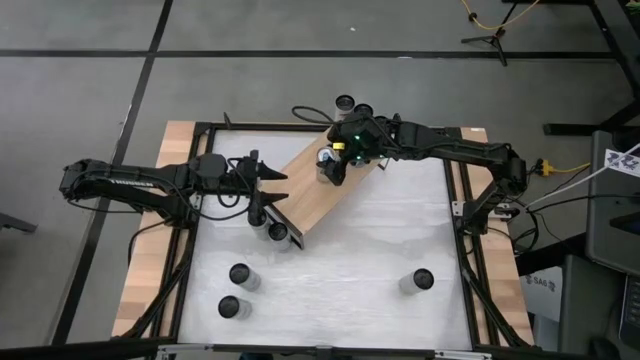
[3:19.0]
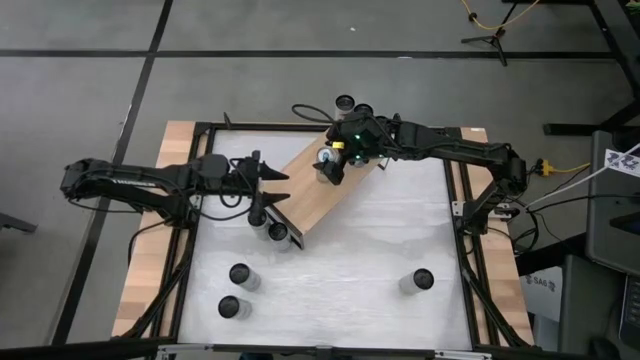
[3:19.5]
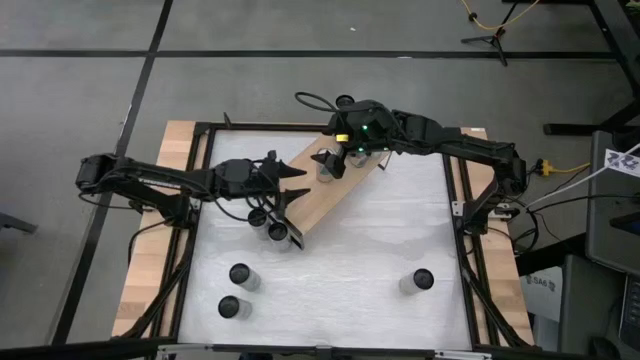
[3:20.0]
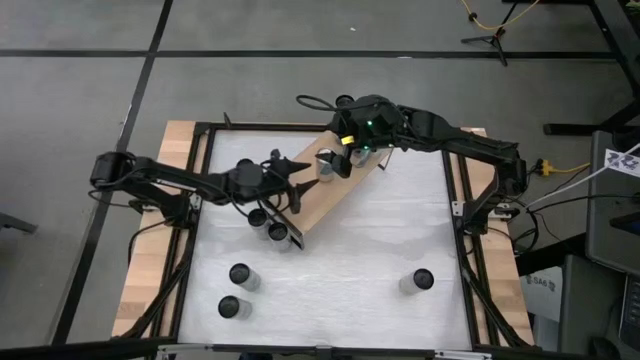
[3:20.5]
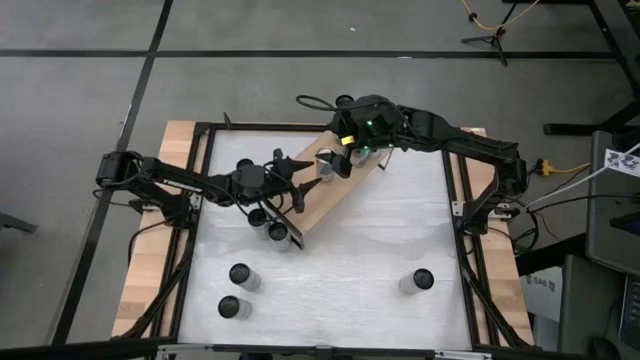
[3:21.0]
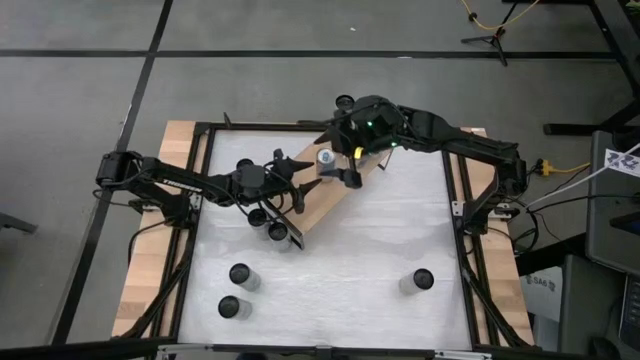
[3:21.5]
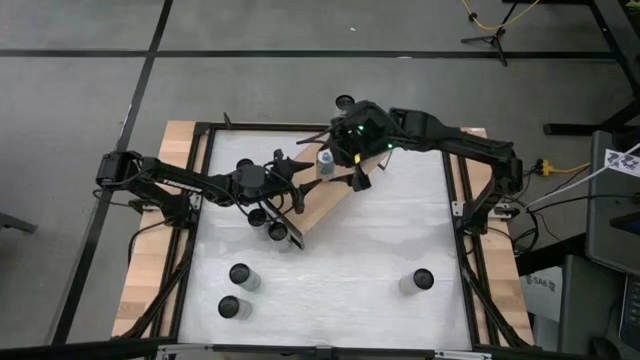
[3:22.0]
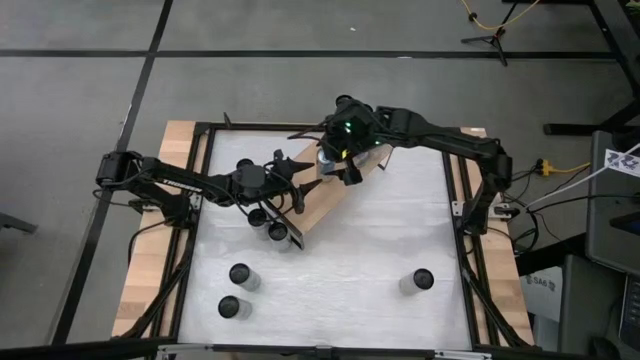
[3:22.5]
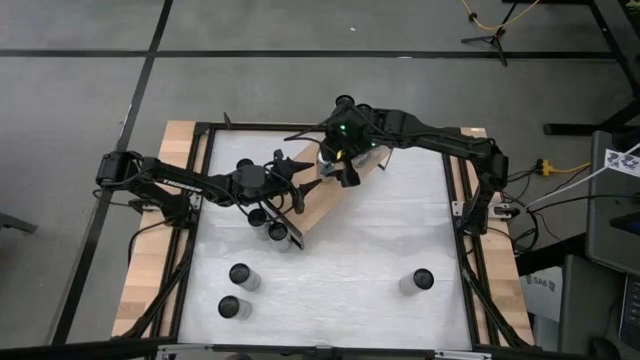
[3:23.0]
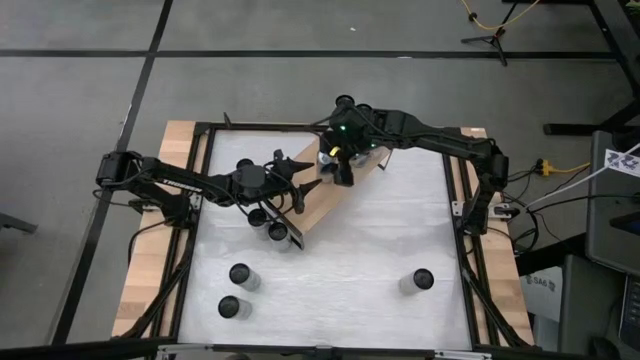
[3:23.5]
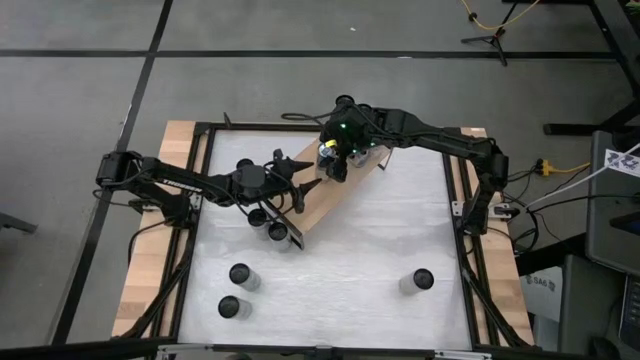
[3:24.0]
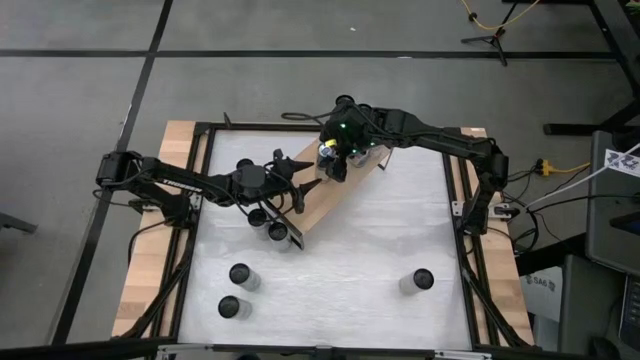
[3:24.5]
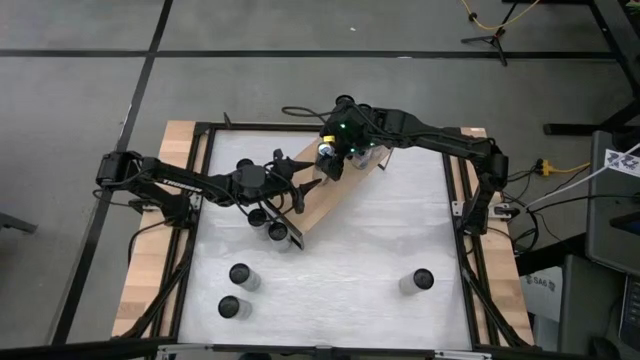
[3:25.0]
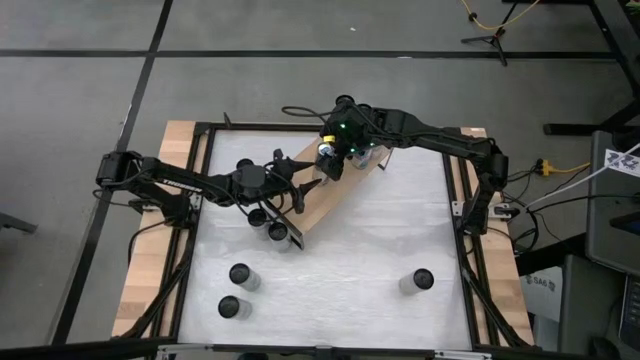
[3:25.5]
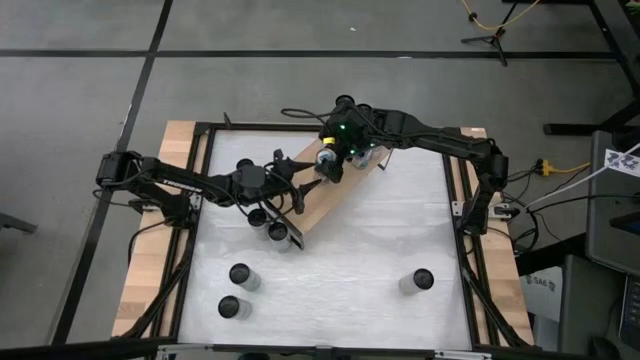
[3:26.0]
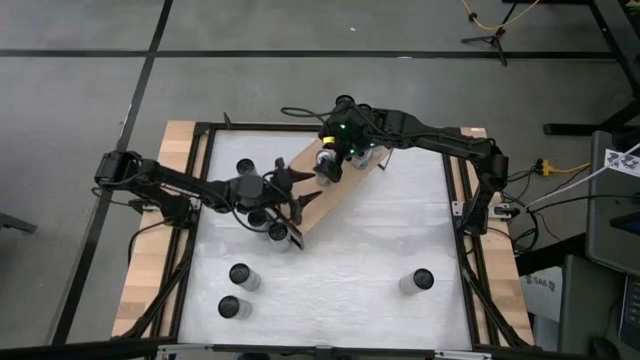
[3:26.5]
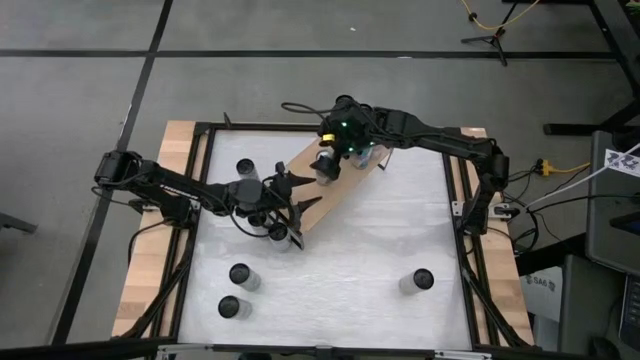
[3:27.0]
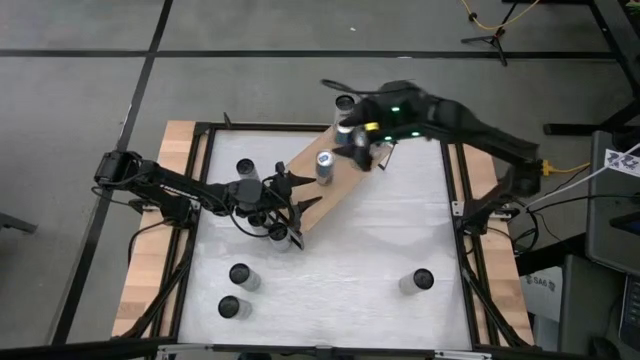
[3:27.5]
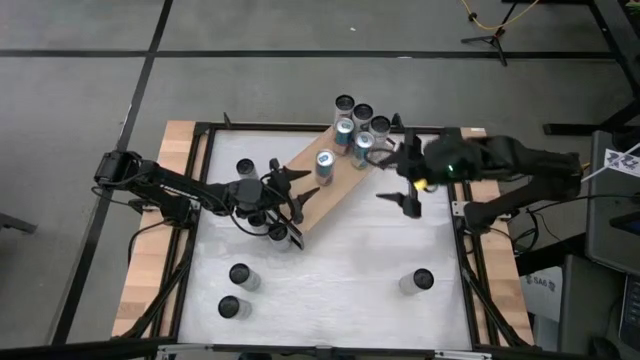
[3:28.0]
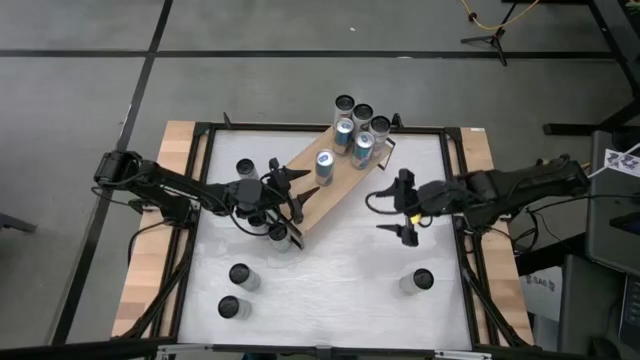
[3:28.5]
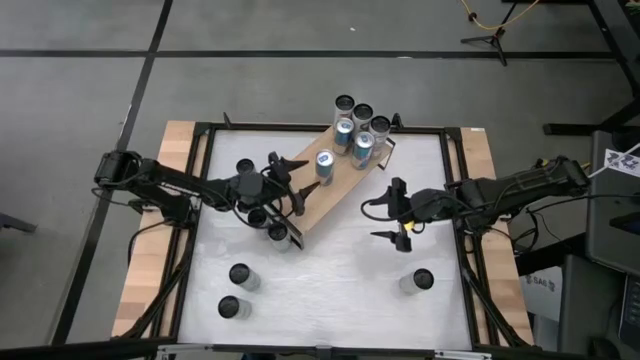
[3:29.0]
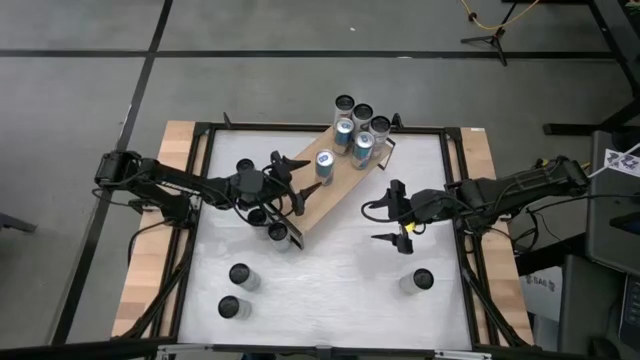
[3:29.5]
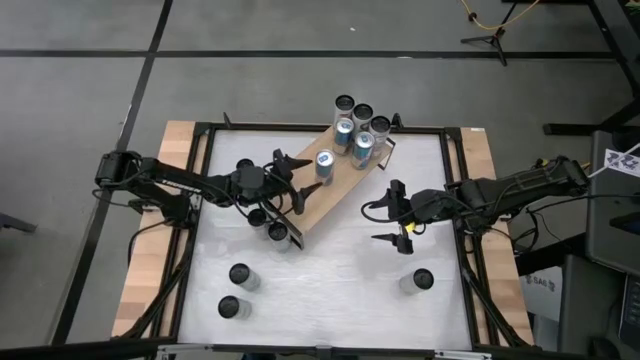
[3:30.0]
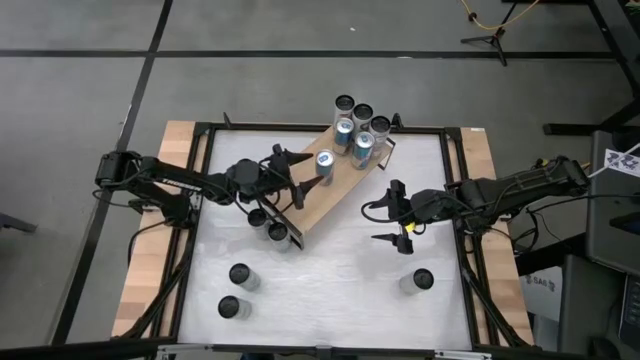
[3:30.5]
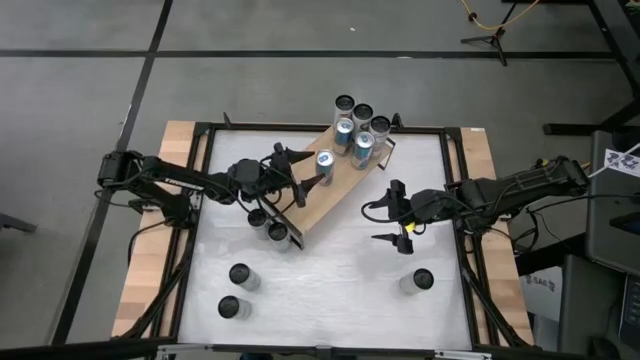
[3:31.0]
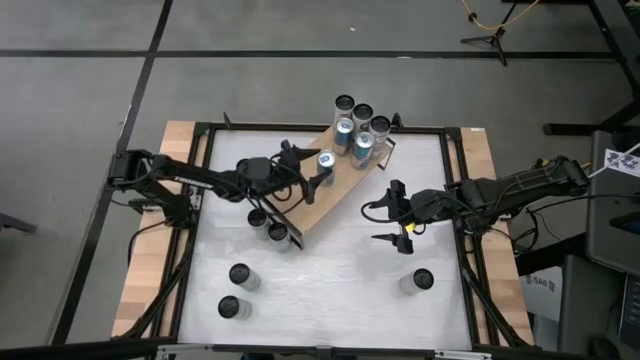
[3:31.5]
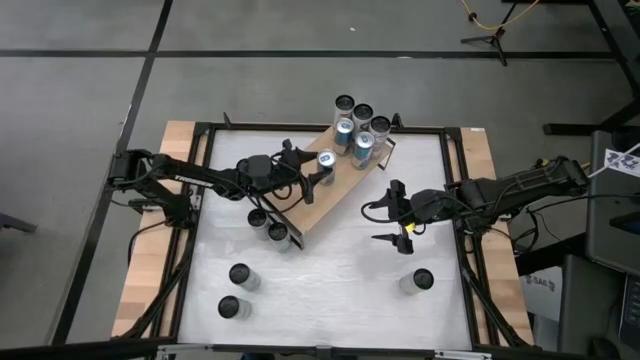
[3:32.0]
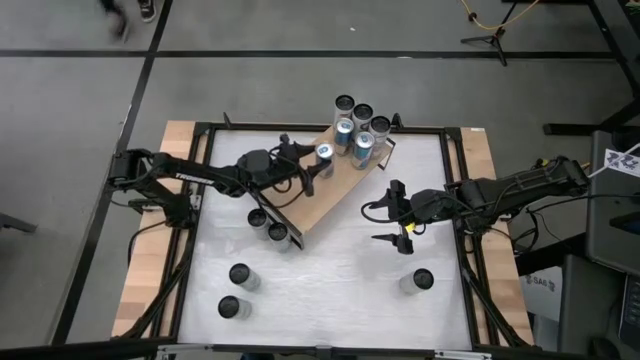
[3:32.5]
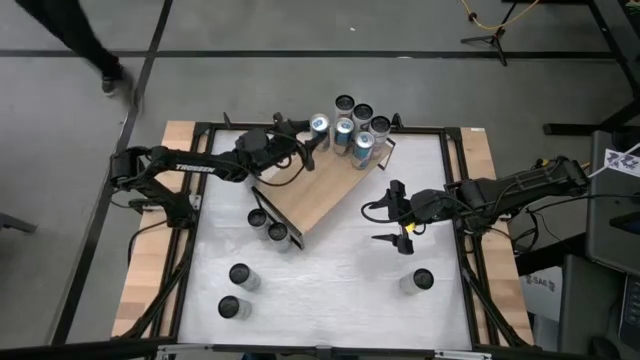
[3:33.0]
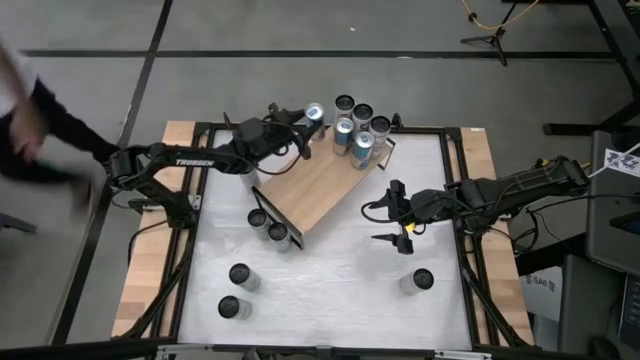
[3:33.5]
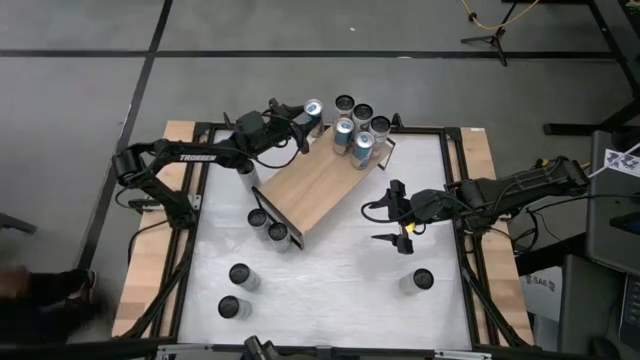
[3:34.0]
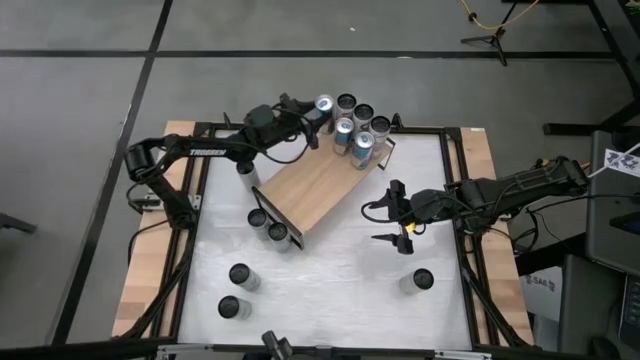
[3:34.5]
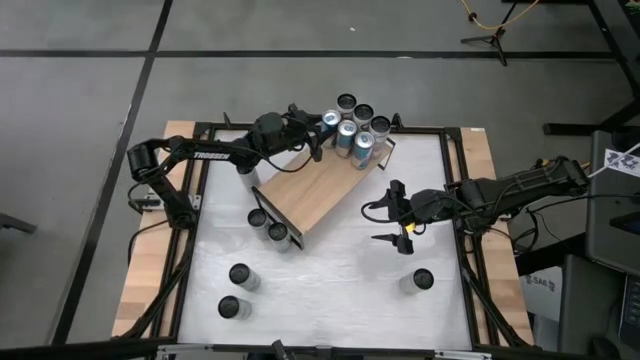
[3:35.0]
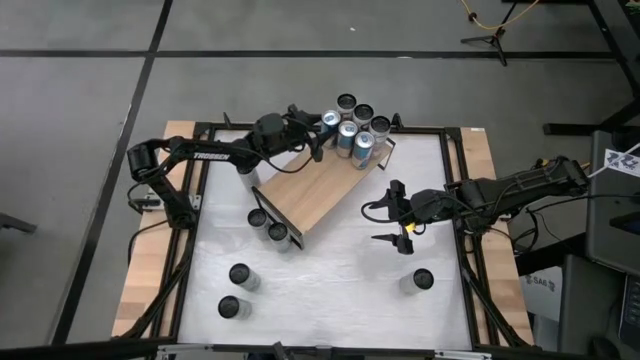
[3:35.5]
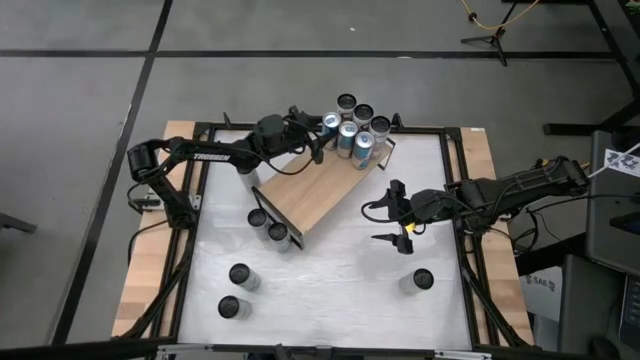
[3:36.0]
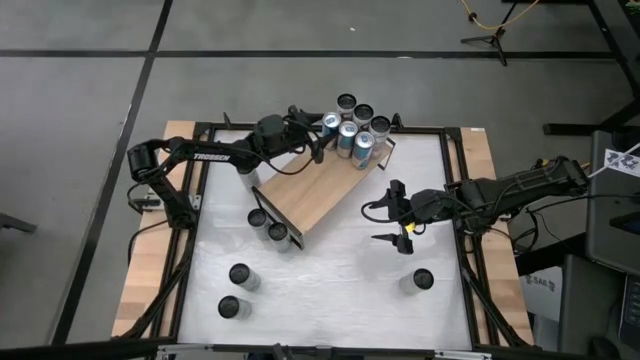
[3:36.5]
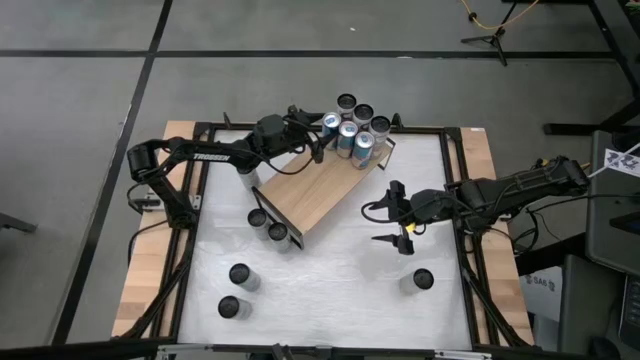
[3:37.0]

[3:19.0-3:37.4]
Task: Place canned beverage on shelf
Put the blue soda can on the shelf aligned with the other blue soda cans

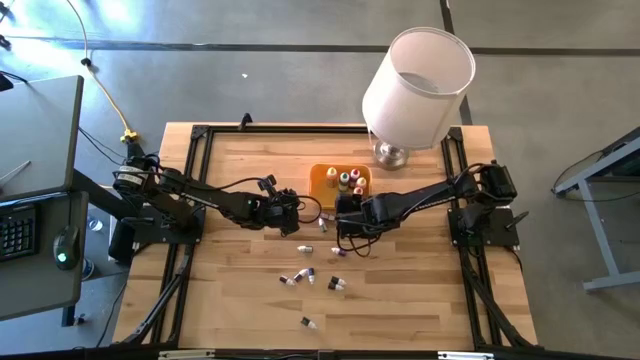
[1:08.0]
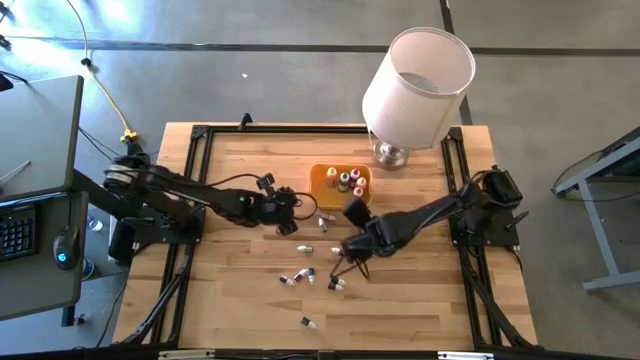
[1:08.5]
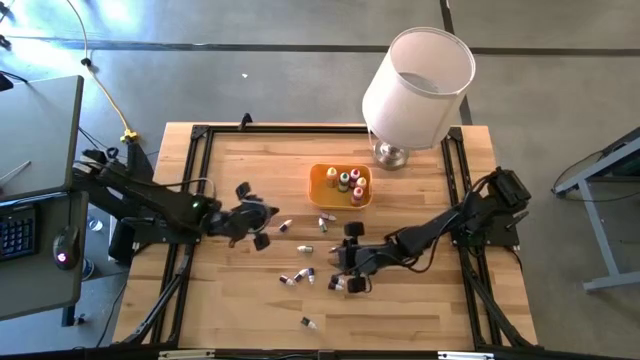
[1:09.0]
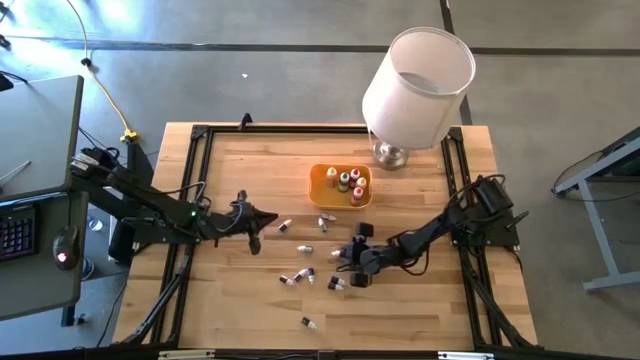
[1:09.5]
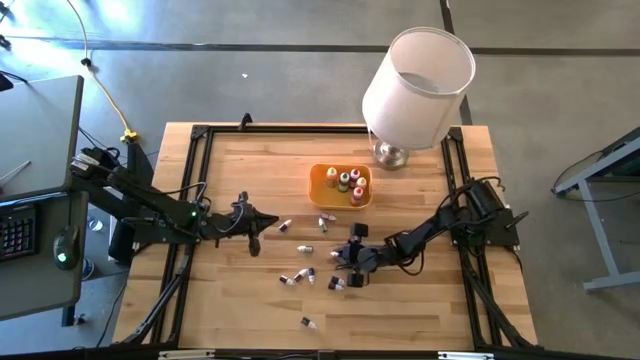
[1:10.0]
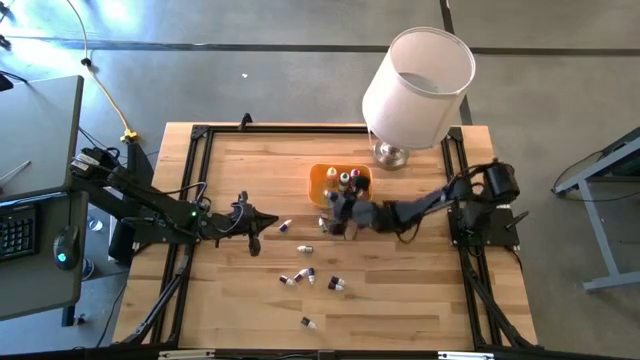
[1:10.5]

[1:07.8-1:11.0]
Task: Pick & Place food coloring
Put the small violet food coloring bottle into the yellow container

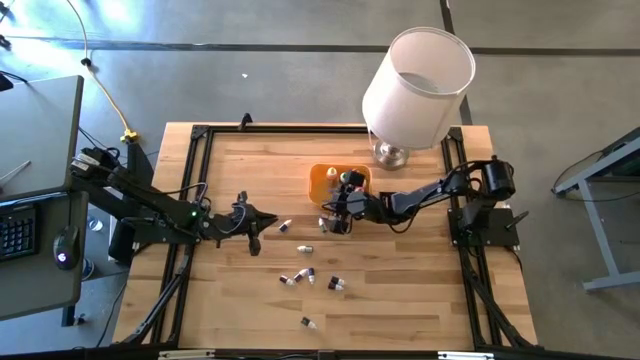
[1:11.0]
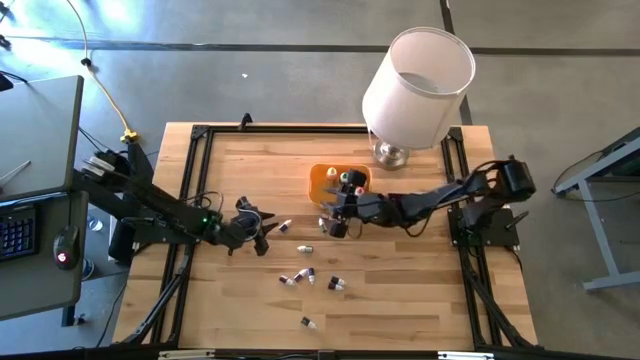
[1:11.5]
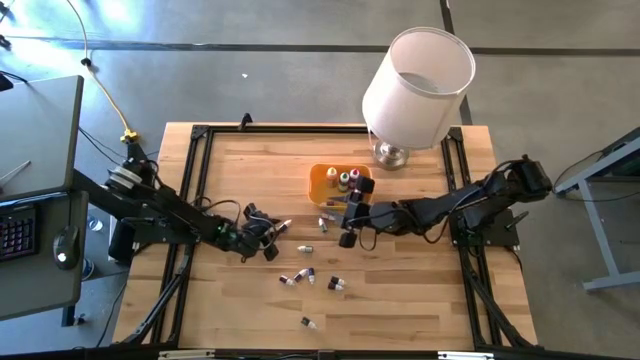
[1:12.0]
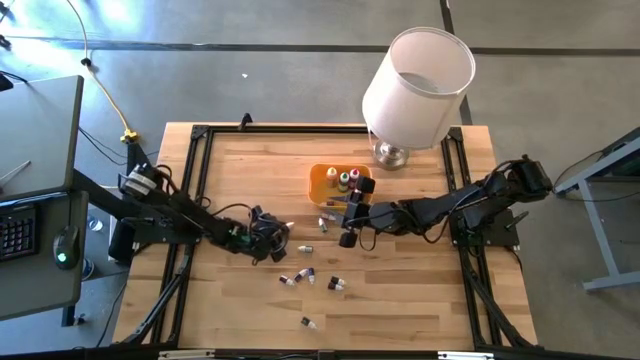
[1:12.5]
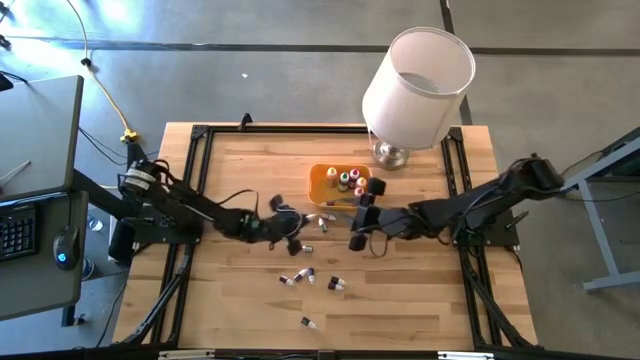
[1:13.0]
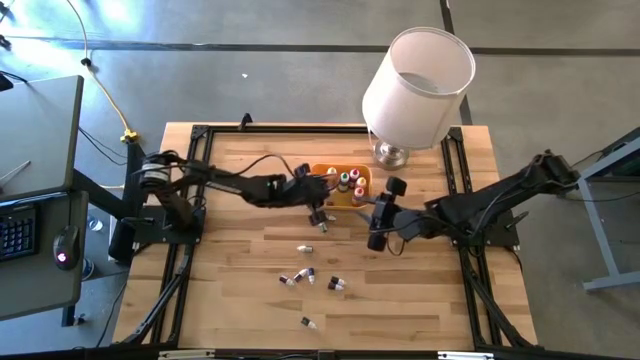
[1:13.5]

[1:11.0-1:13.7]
Put the small blue food coloring bottle into the yellow container
